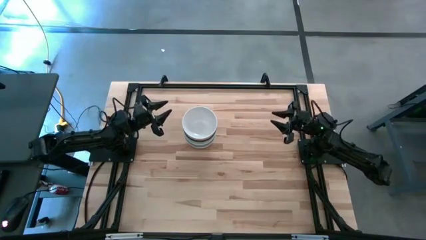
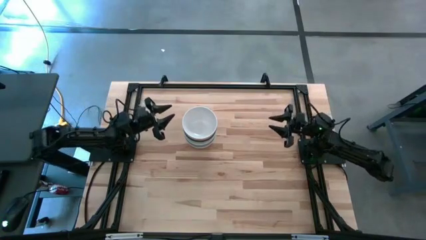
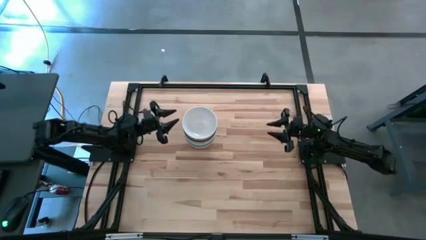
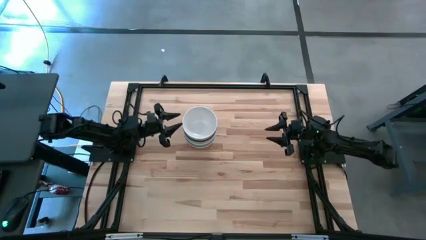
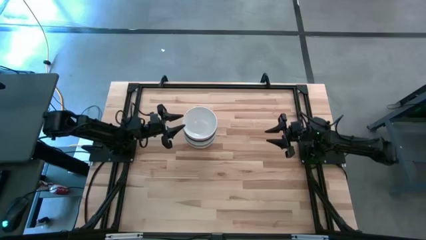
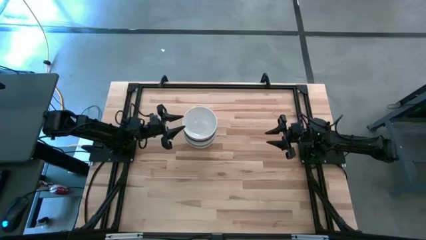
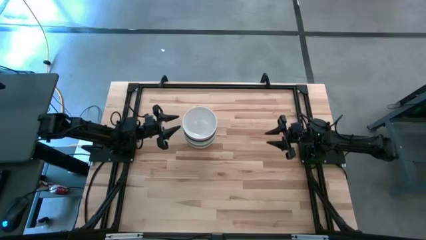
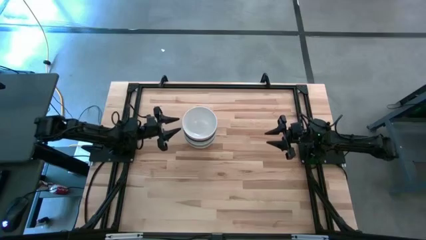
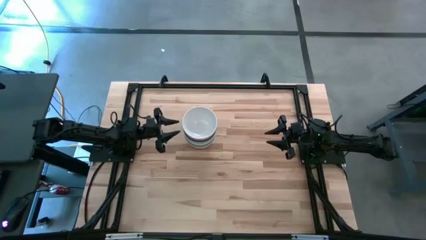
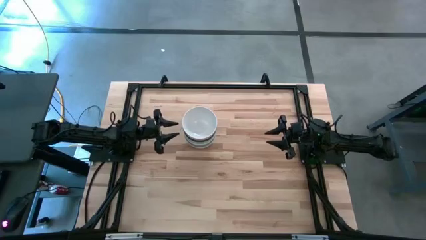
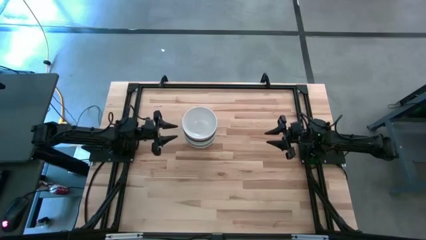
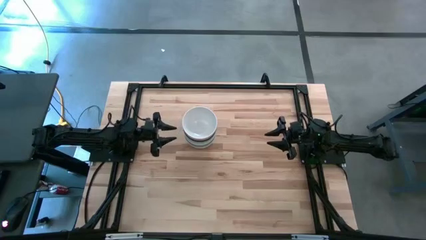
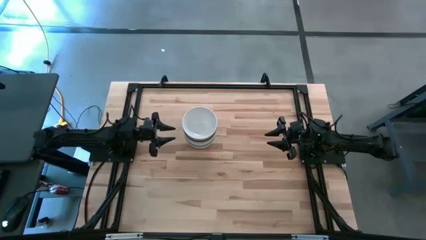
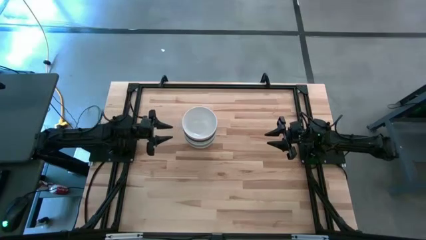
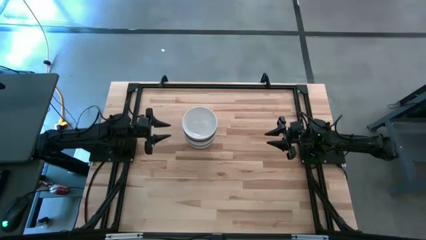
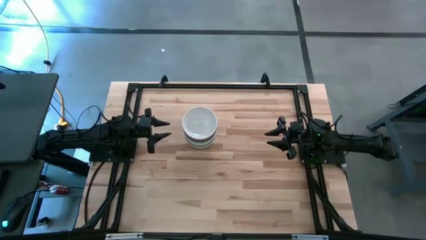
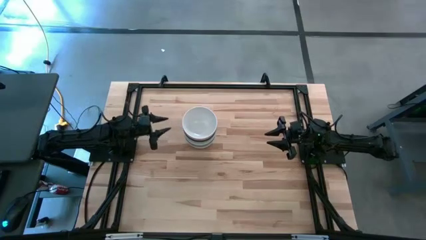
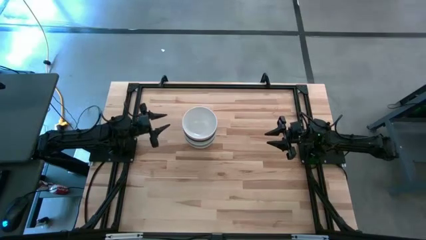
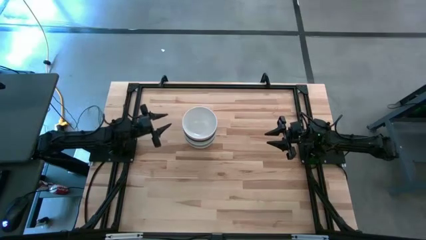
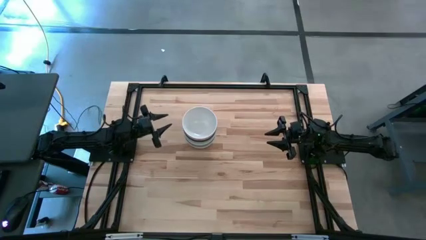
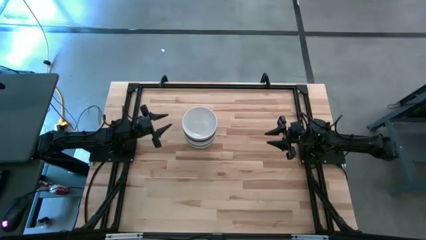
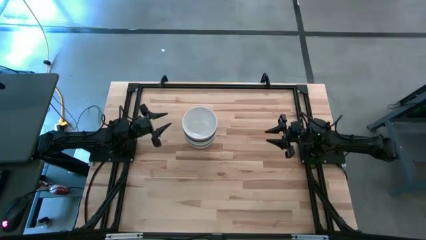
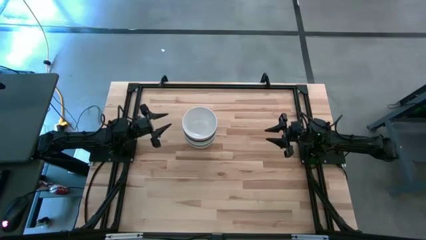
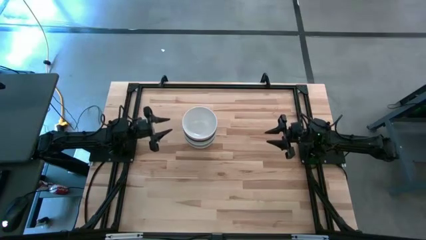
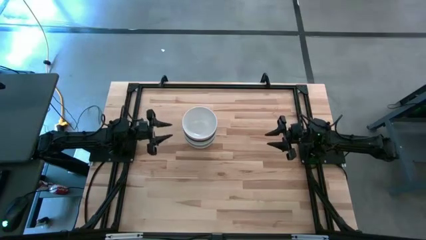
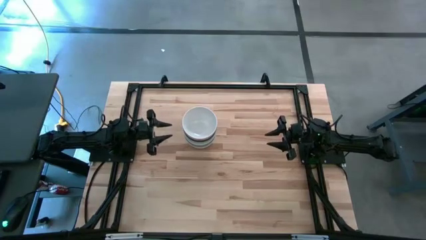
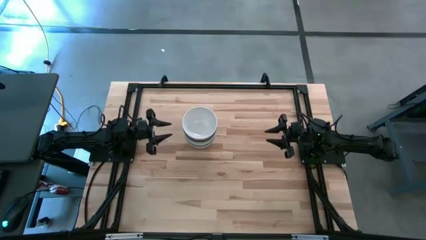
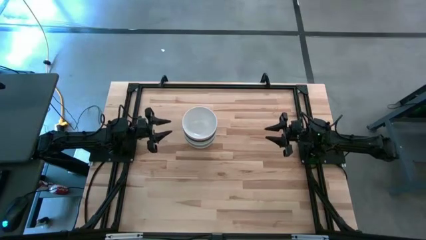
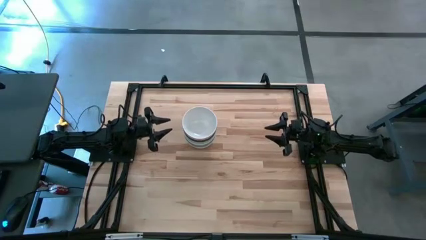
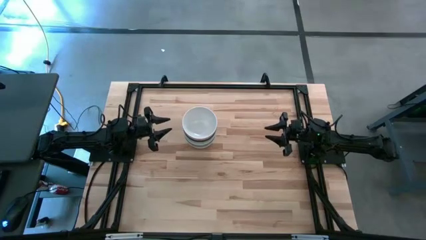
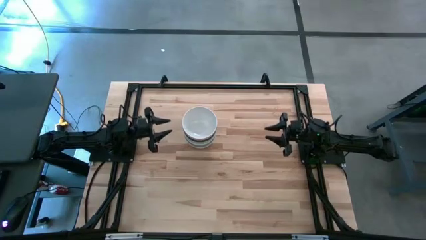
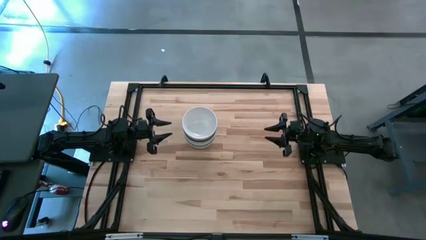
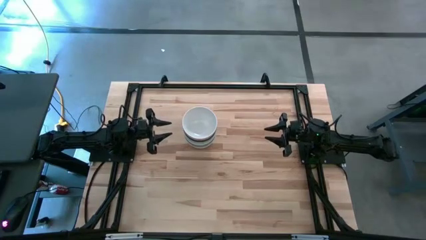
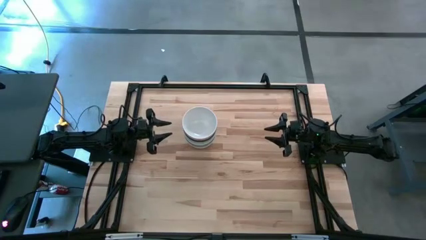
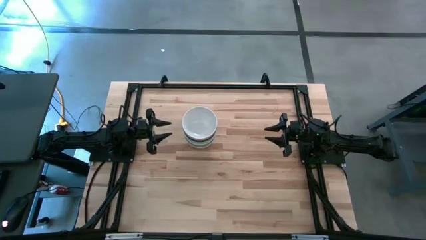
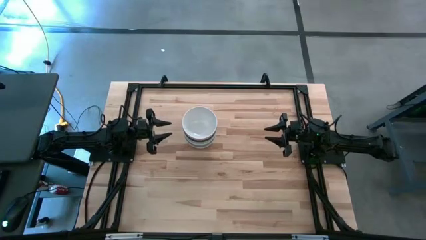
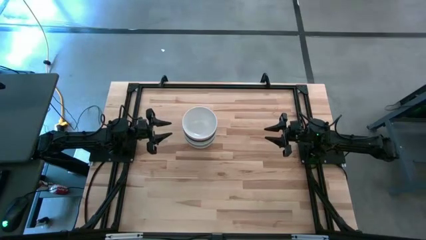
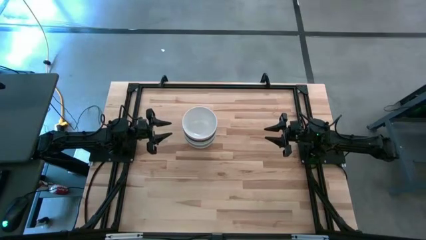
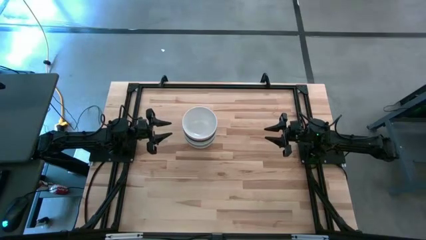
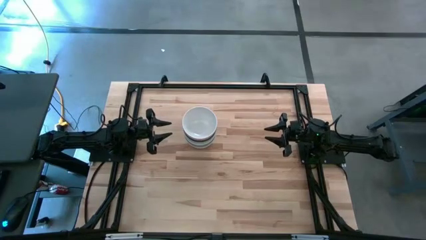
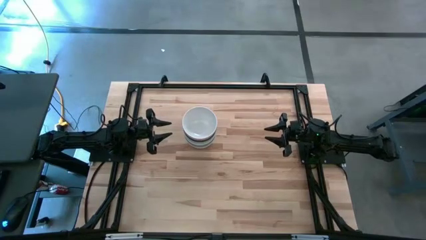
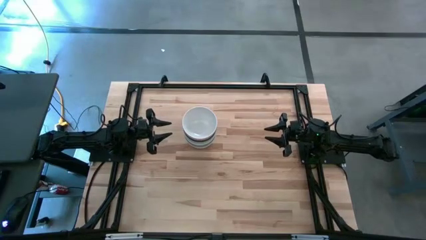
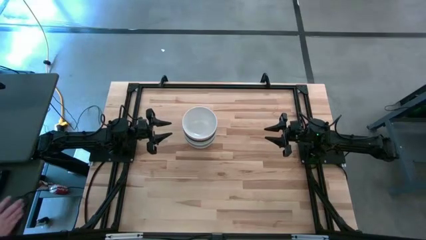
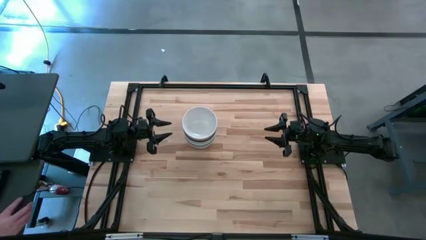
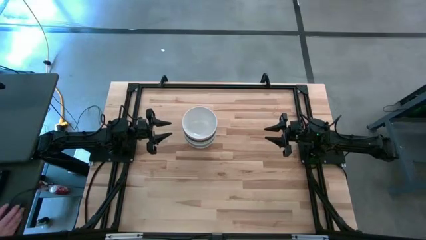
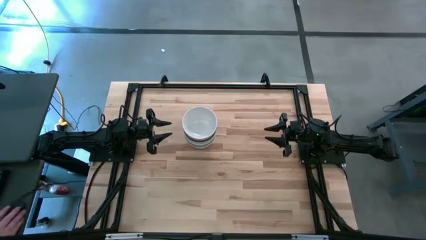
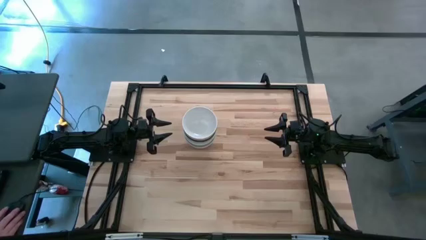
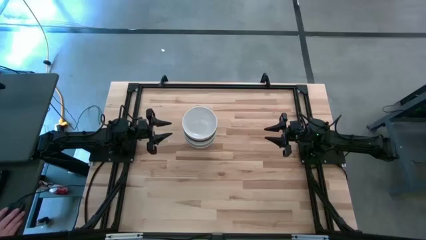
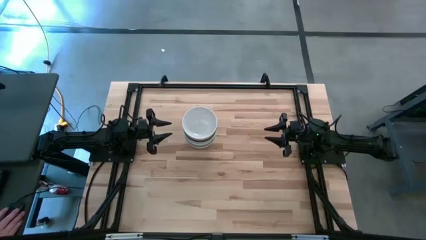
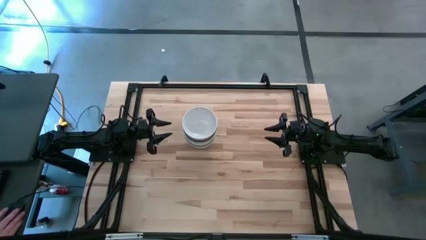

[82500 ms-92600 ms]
Task: Nest bowls inside each other
Return to Home Position
